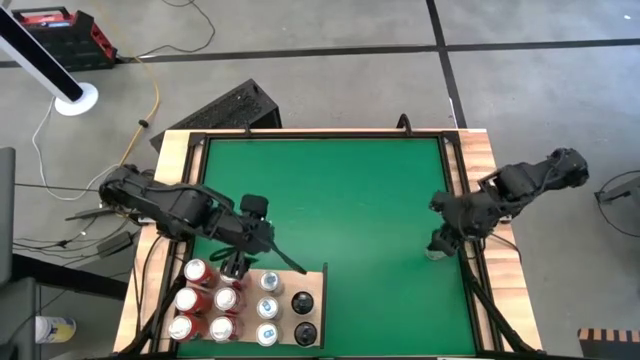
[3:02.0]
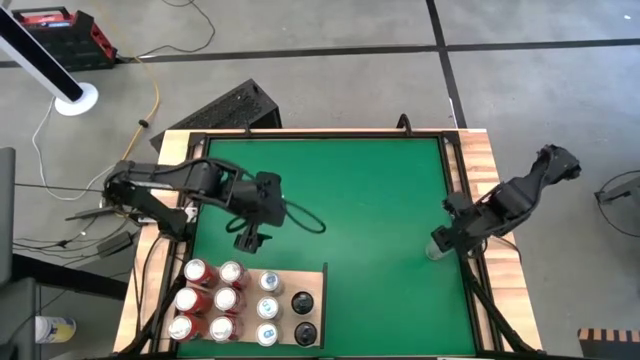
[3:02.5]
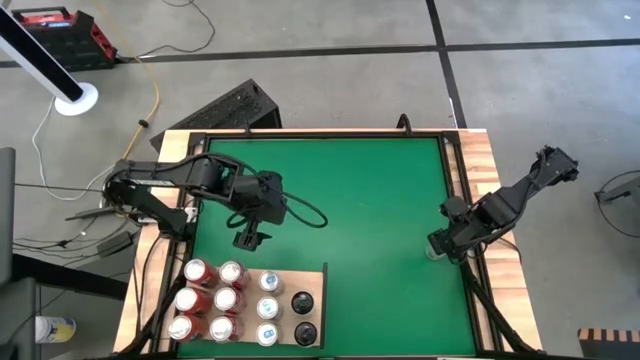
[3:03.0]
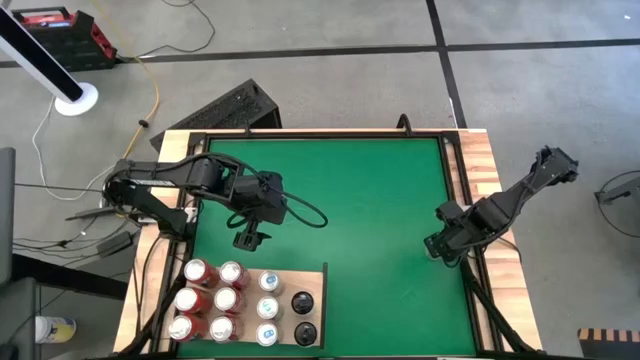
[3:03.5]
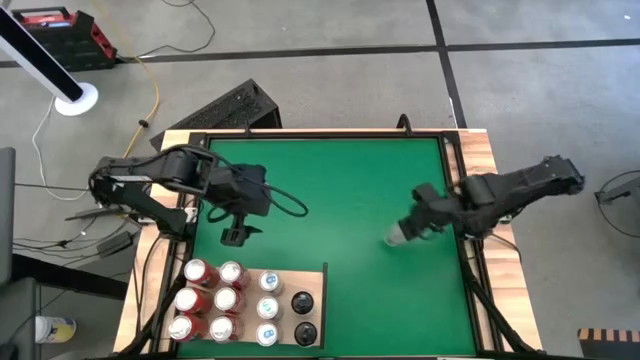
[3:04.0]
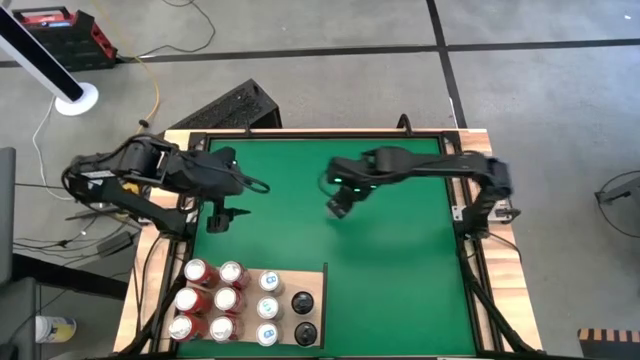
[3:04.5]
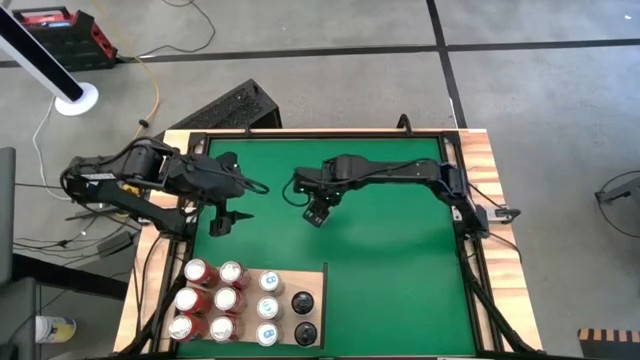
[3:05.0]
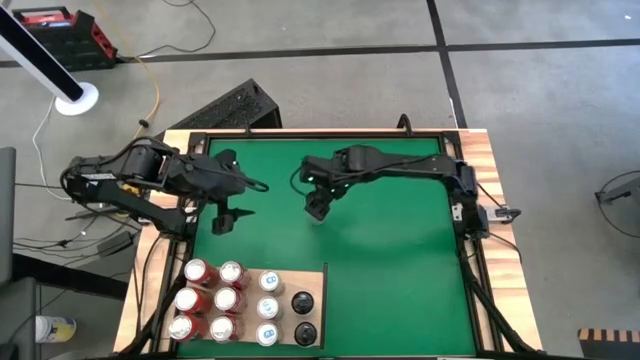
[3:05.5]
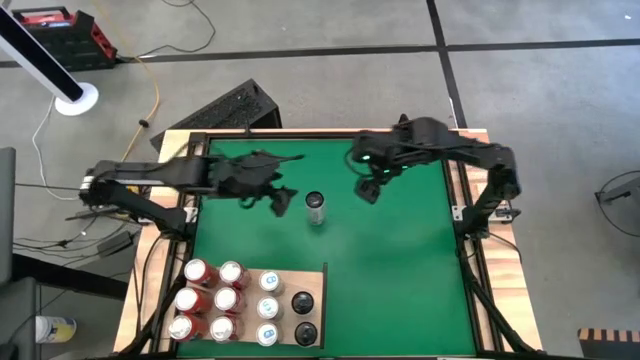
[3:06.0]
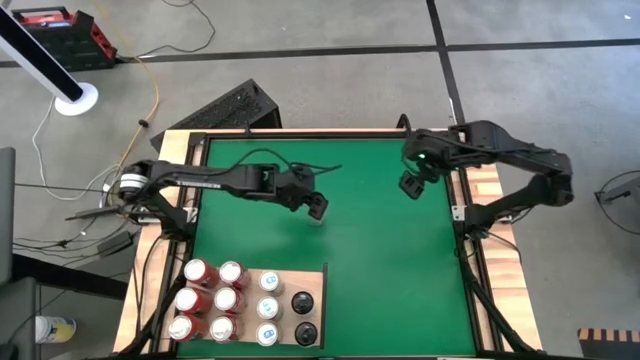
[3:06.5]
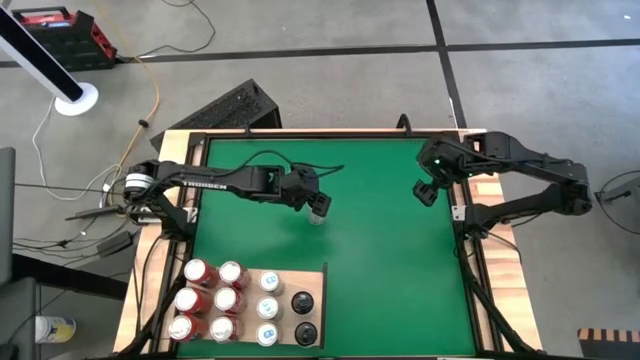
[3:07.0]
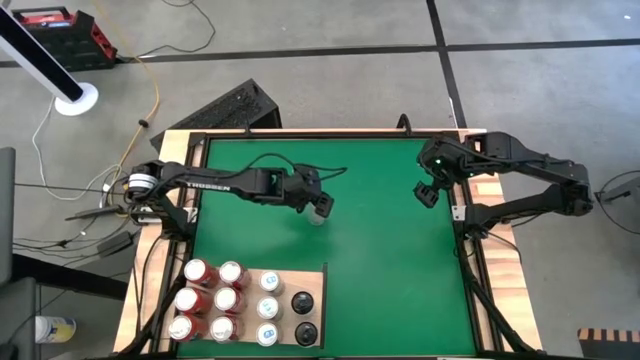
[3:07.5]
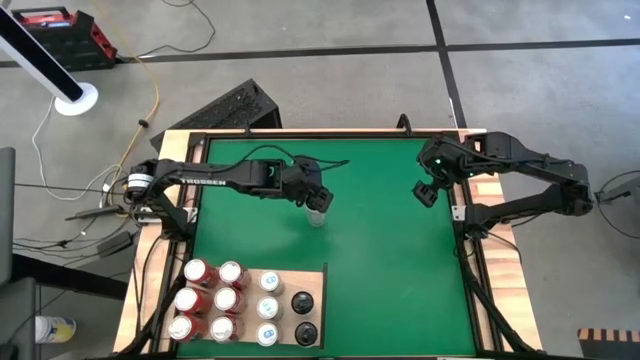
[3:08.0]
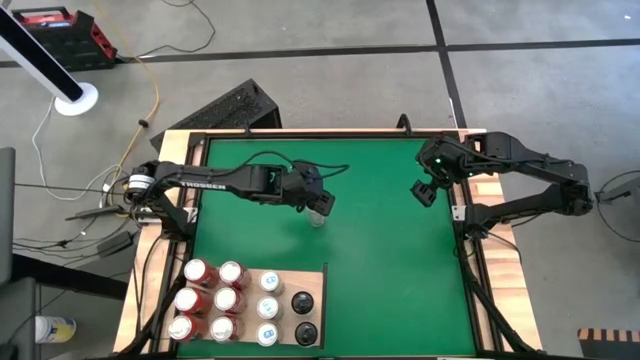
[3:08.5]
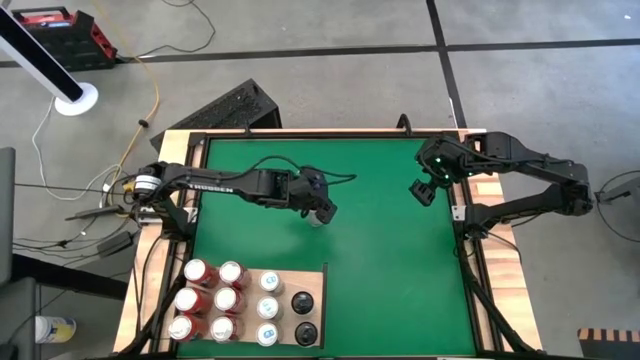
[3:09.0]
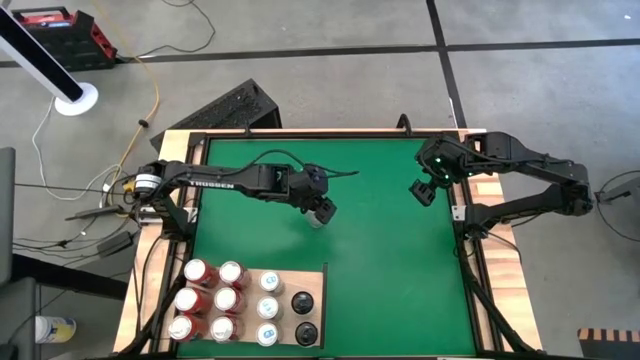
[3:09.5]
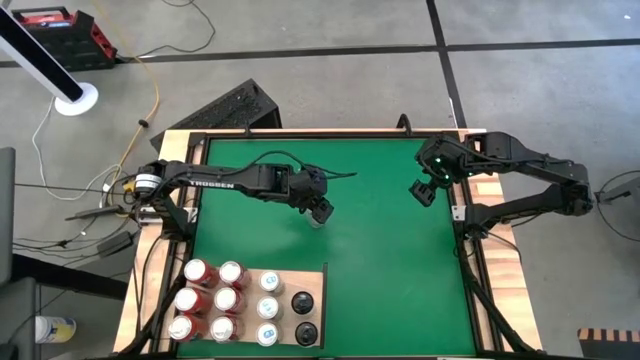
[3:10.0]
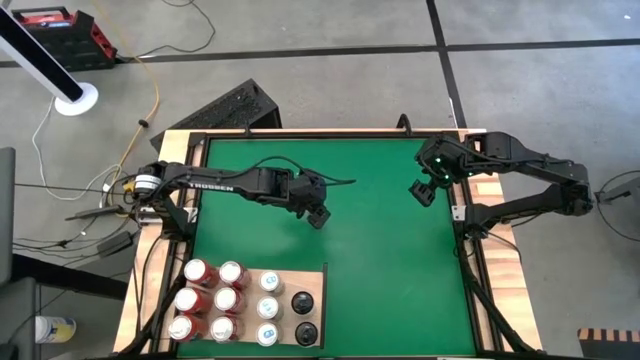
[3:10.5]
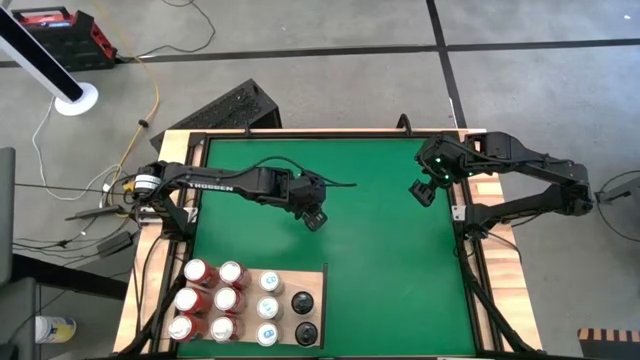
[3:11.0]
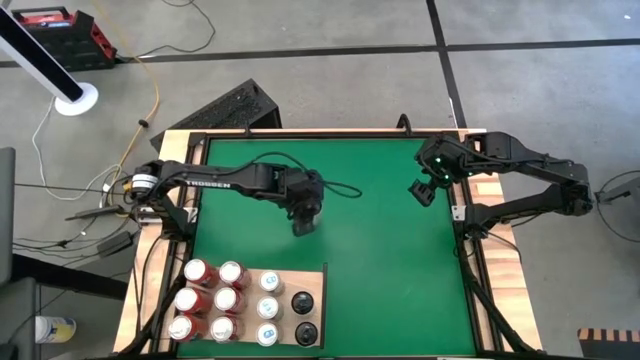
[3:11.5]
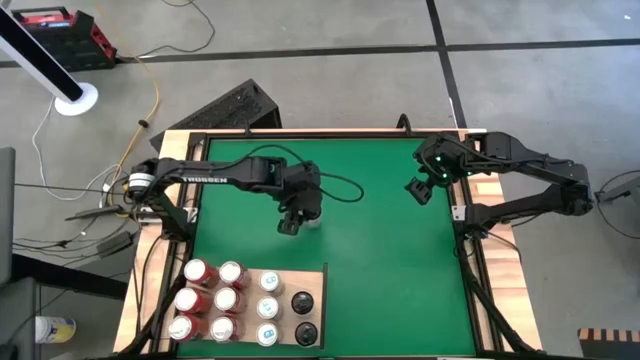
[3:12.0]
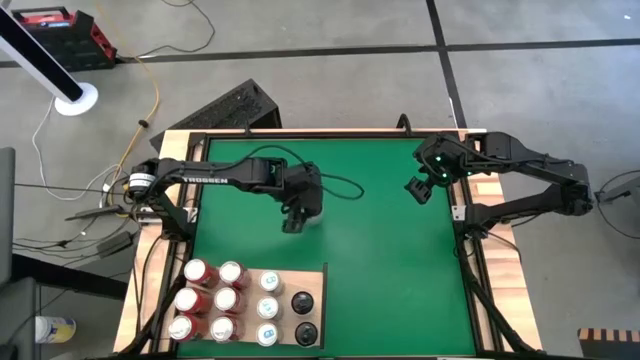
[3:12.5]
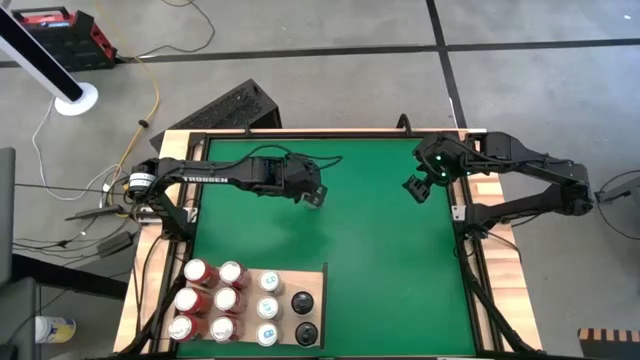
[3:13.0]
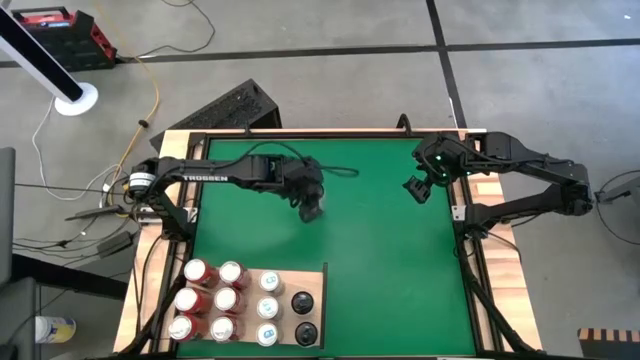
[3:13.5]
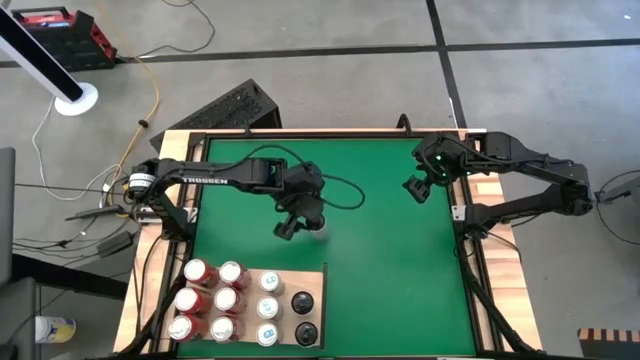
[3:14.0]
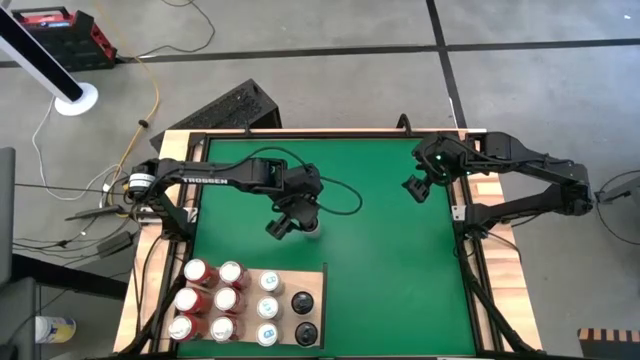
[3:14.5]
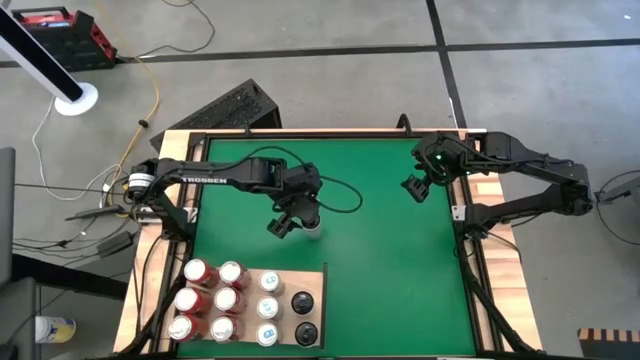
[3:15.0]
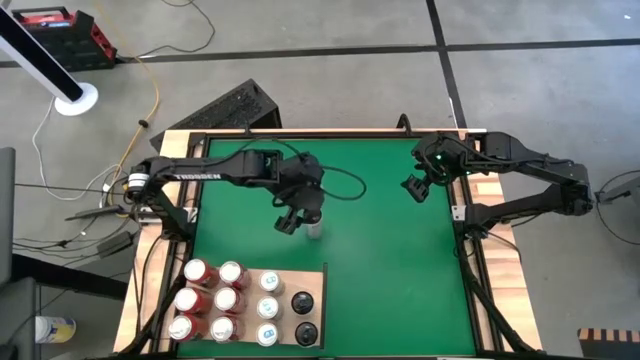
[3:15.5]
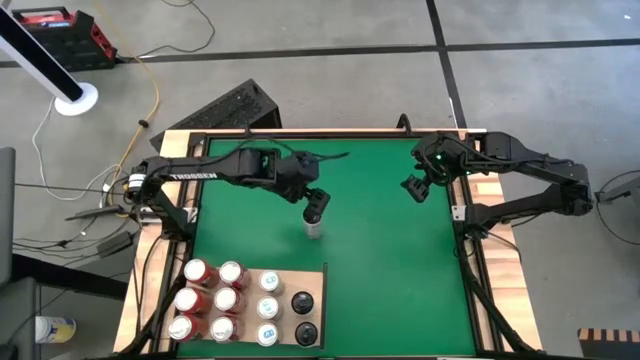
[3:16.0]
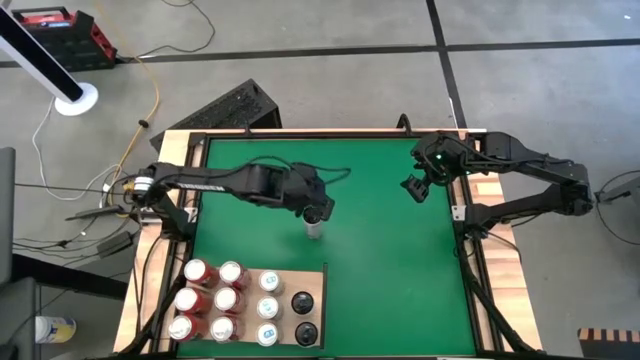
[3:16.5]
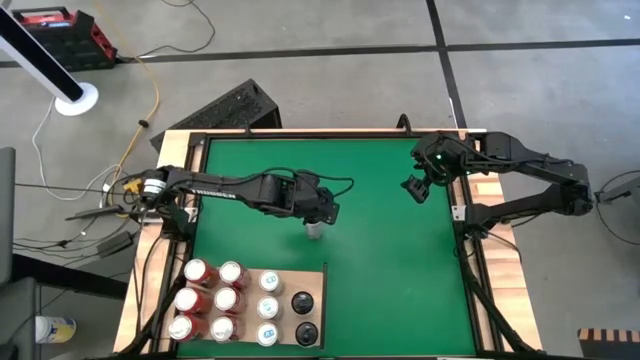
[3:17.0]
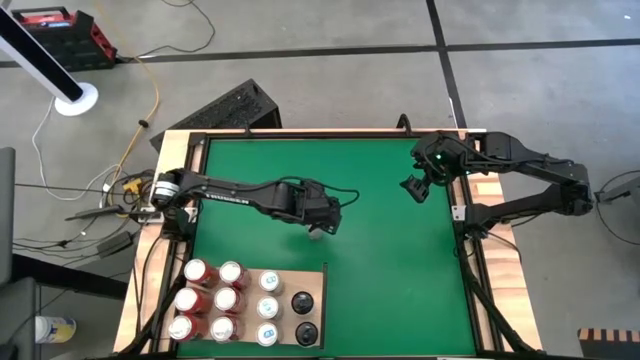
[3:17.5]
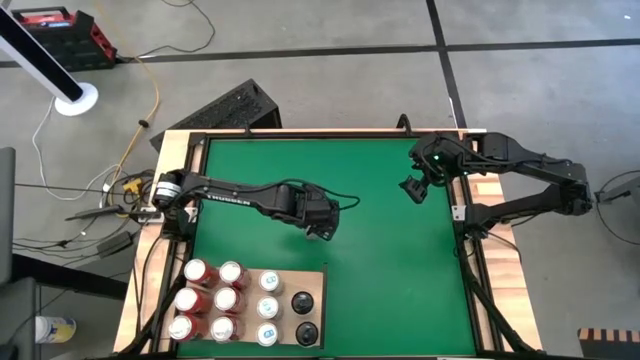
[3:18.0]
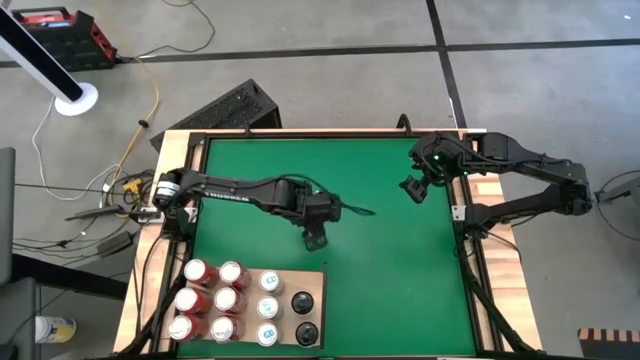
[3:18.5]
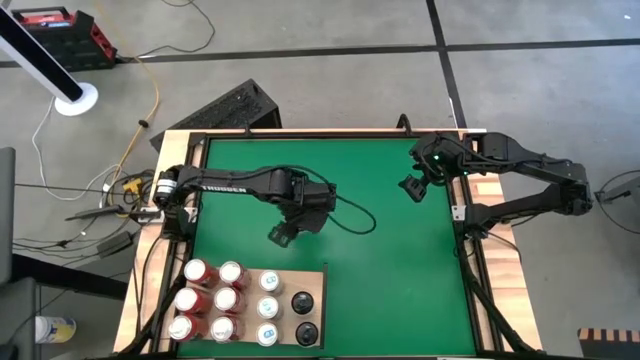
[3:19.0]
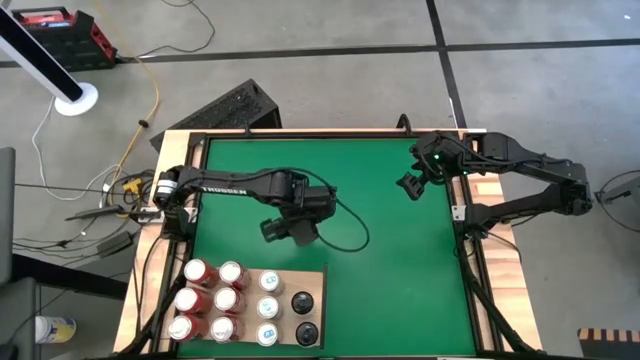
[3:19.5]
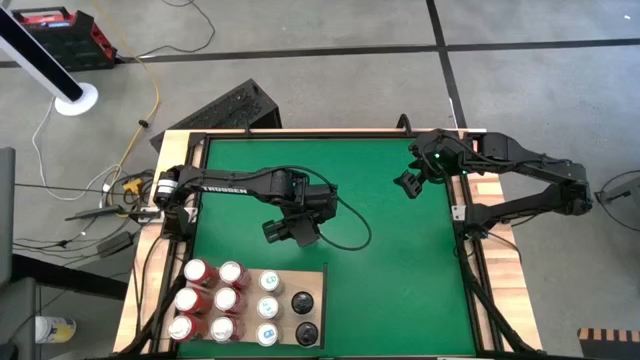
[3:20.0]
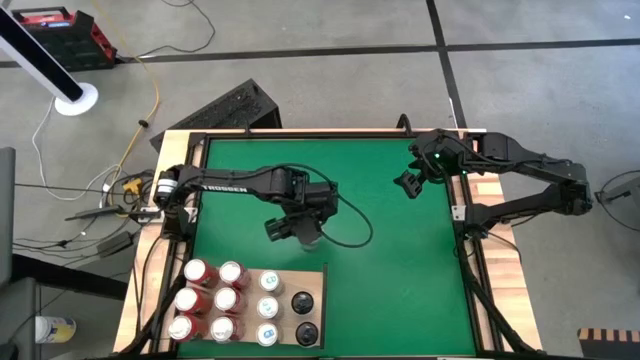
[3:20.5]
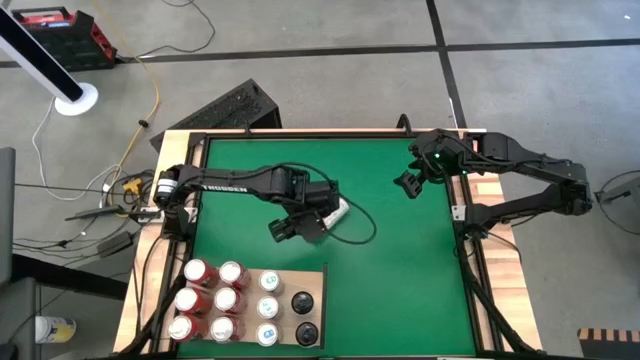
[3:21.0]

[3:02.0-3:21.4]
Task: Place canned beverage on shelf
Put the white yellow soda can on the shelf aligned with the other yellow soda can
